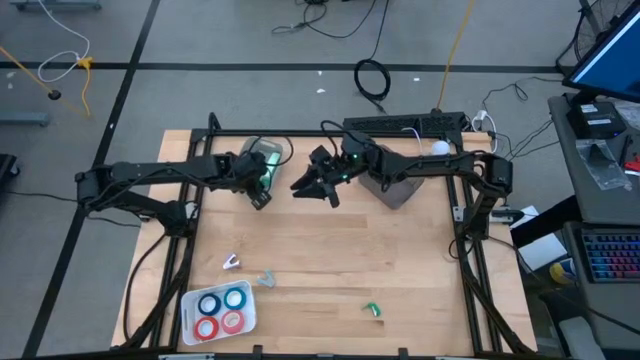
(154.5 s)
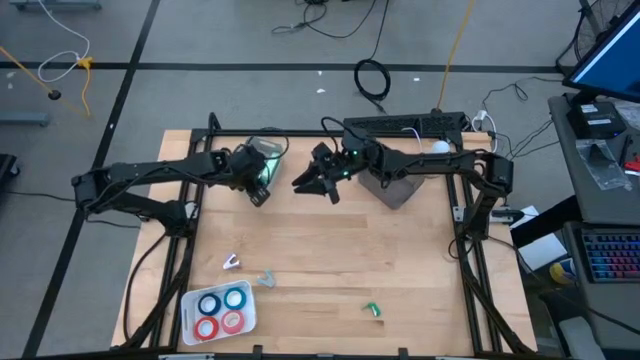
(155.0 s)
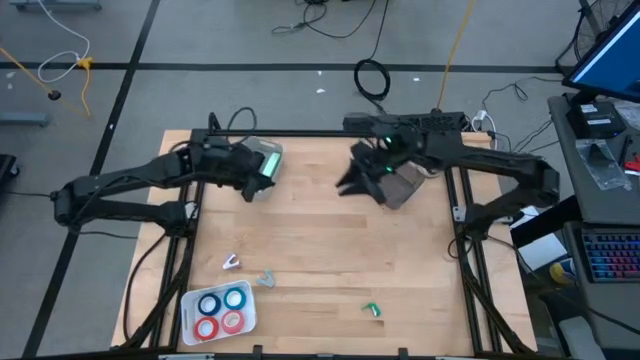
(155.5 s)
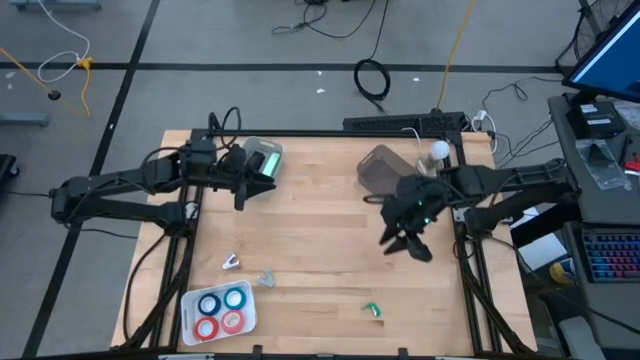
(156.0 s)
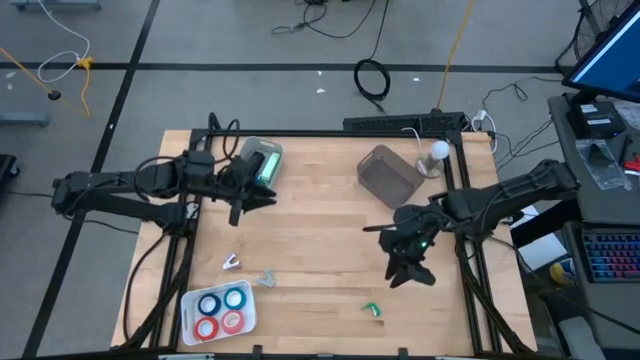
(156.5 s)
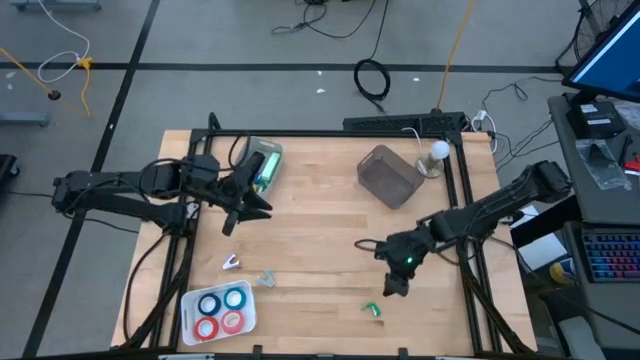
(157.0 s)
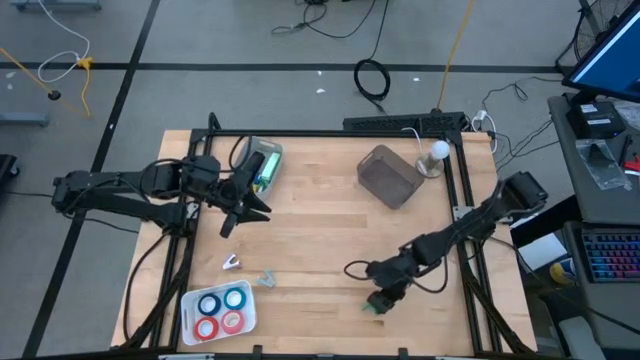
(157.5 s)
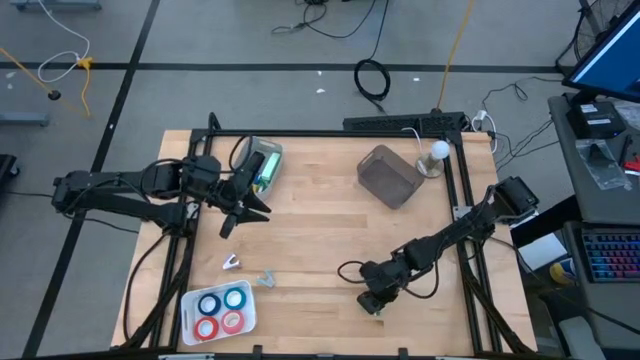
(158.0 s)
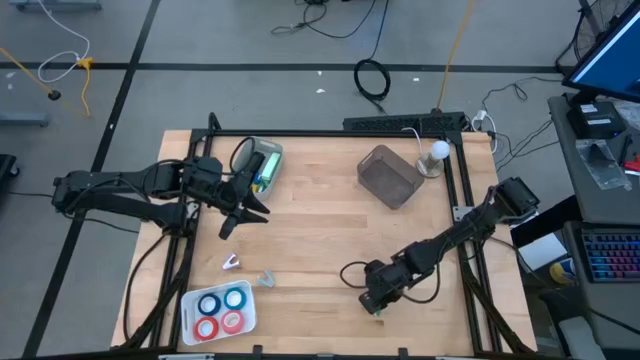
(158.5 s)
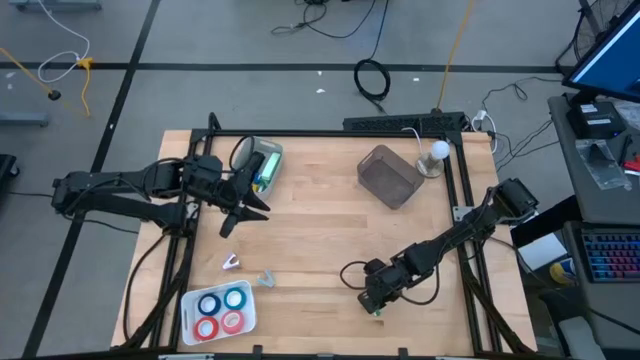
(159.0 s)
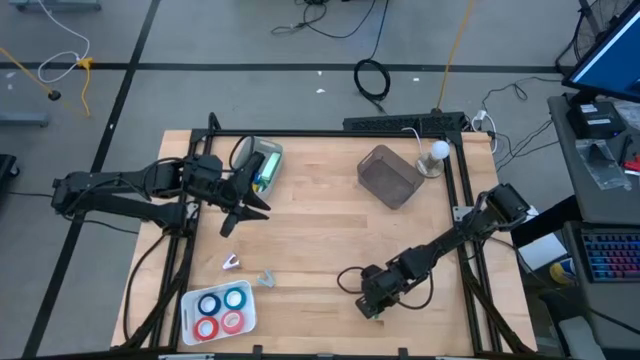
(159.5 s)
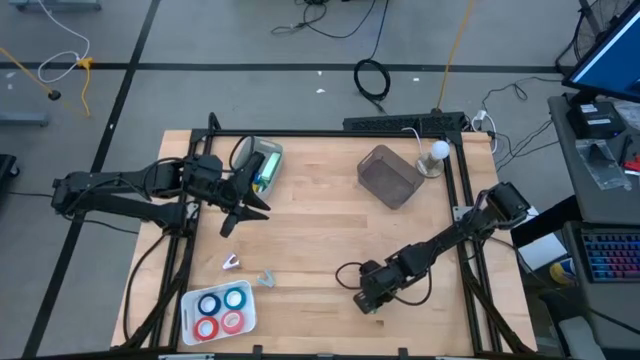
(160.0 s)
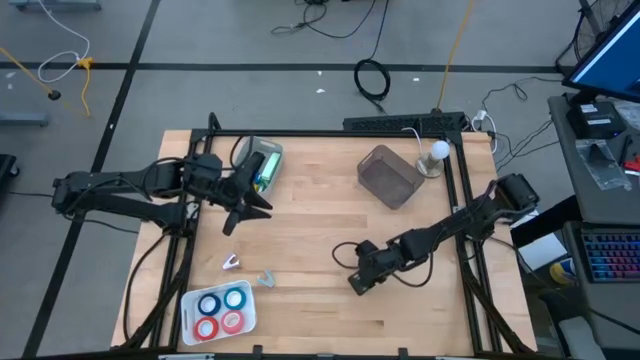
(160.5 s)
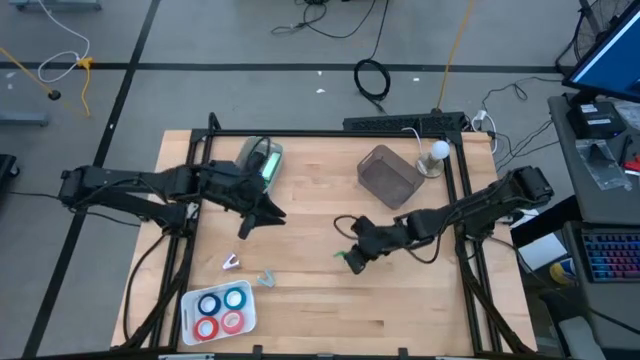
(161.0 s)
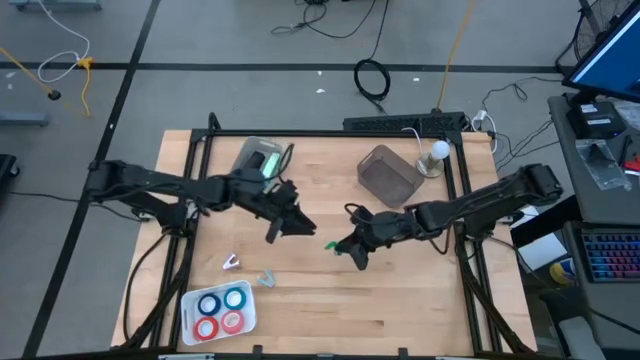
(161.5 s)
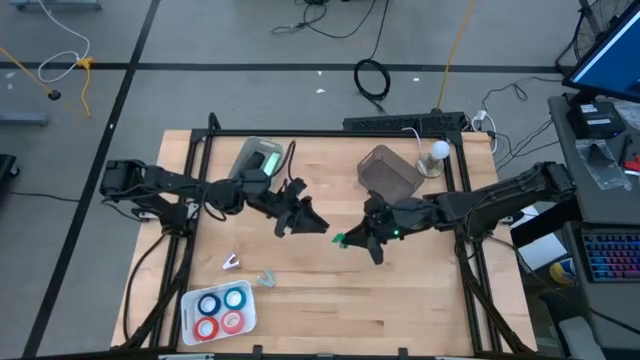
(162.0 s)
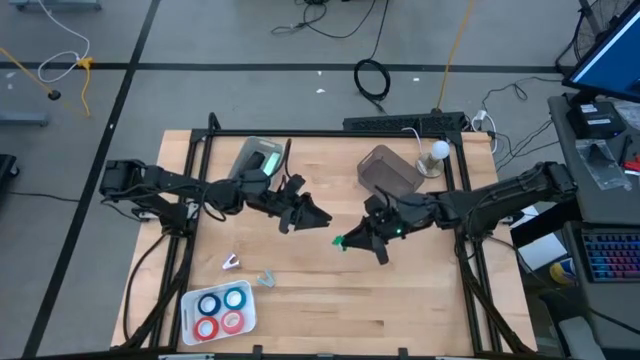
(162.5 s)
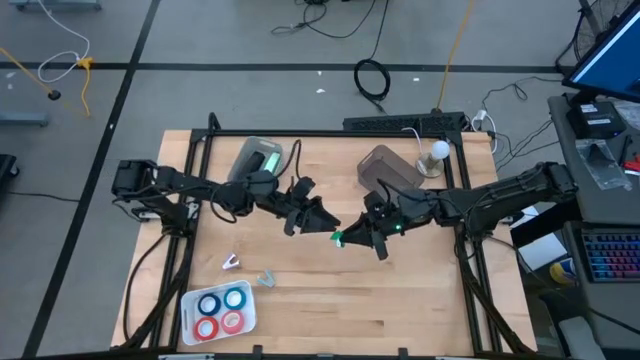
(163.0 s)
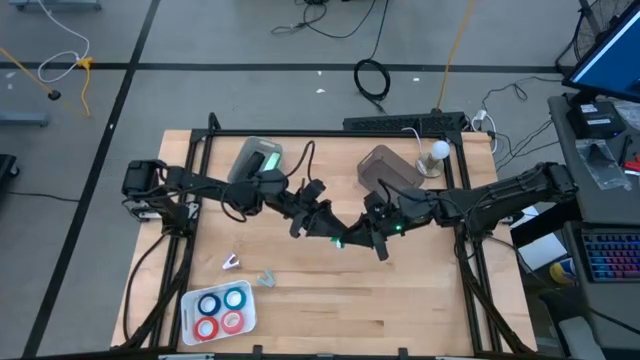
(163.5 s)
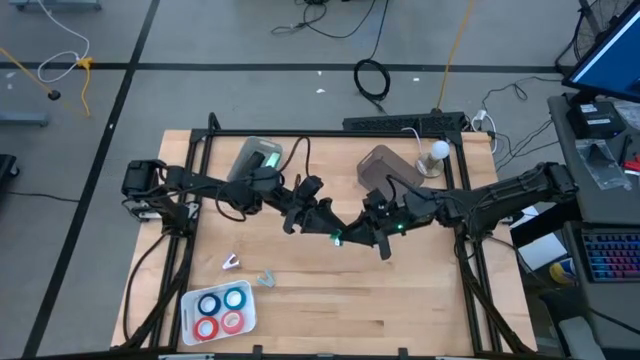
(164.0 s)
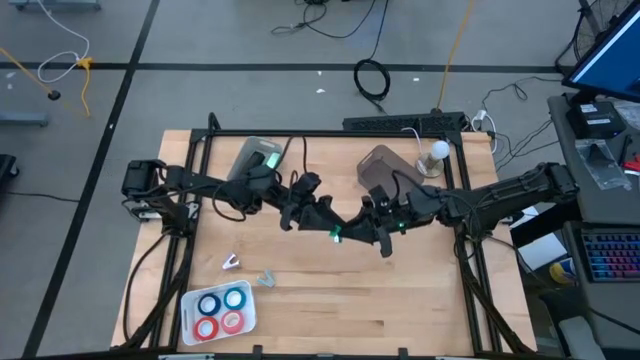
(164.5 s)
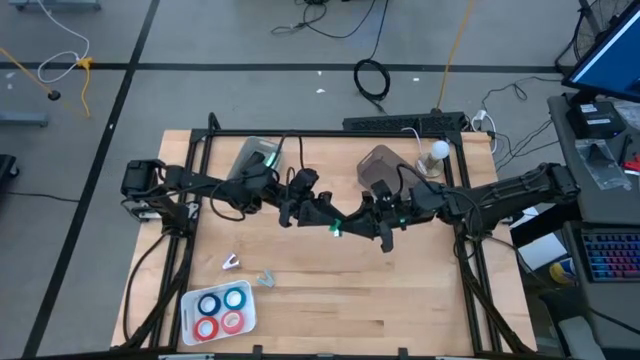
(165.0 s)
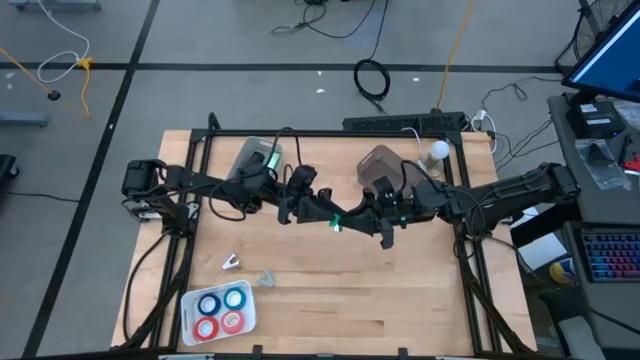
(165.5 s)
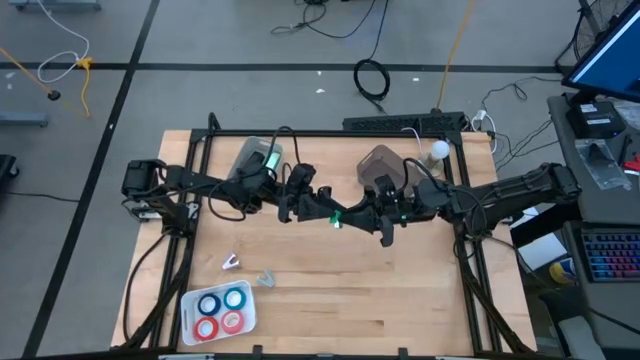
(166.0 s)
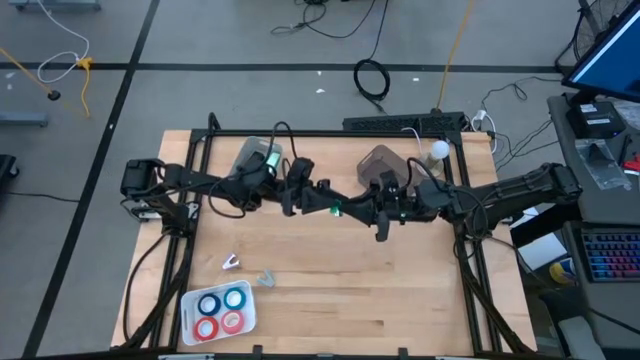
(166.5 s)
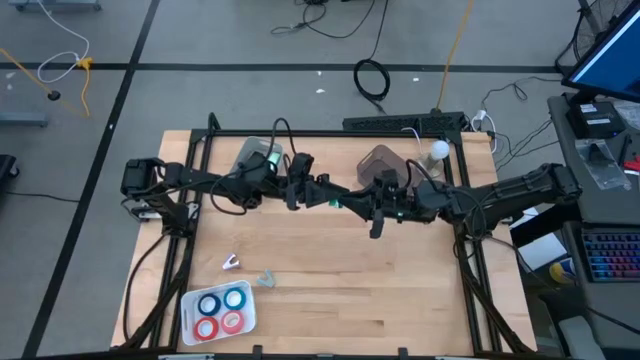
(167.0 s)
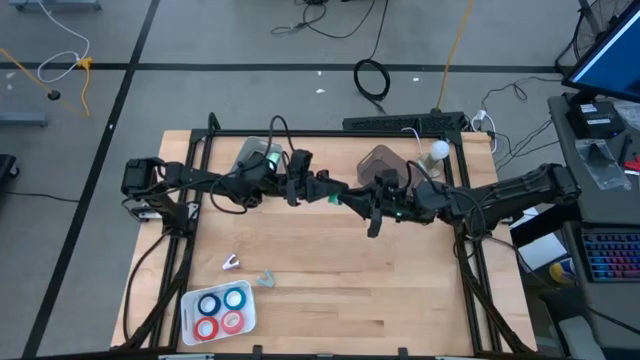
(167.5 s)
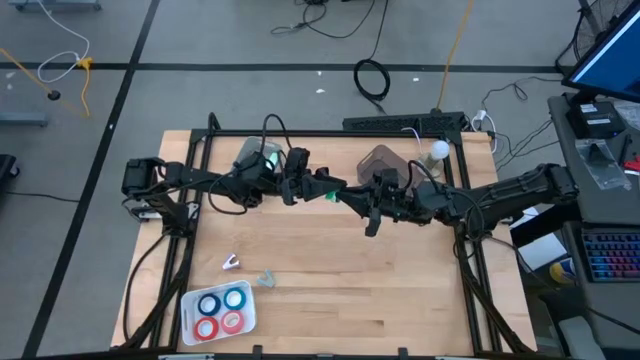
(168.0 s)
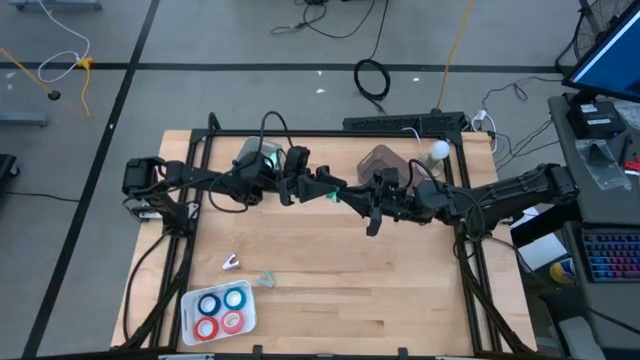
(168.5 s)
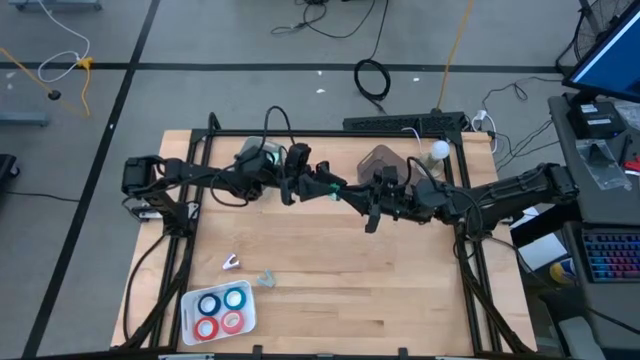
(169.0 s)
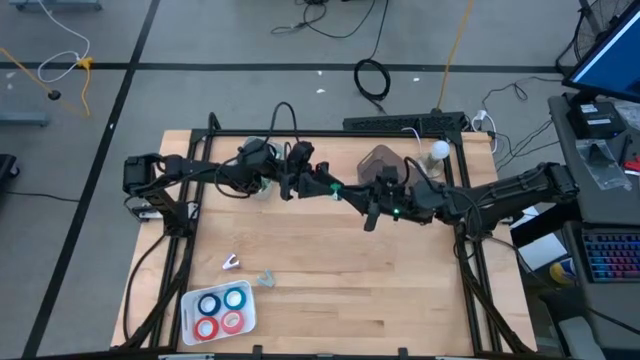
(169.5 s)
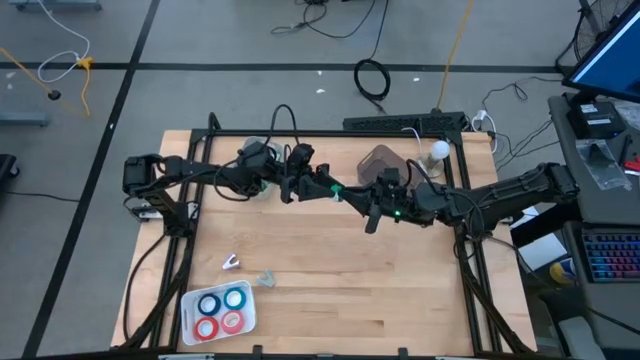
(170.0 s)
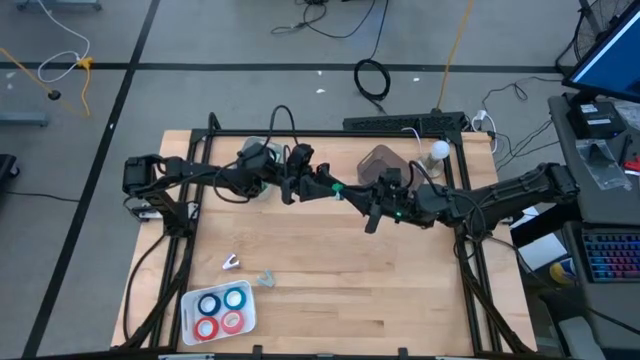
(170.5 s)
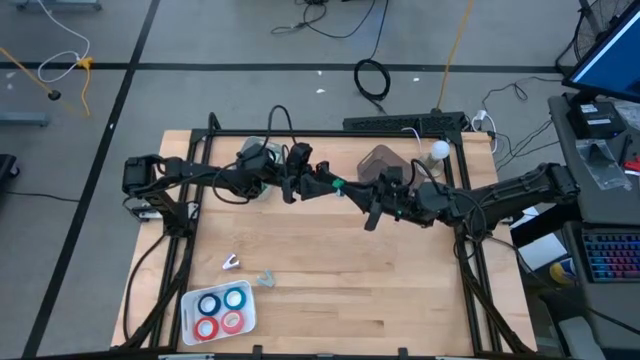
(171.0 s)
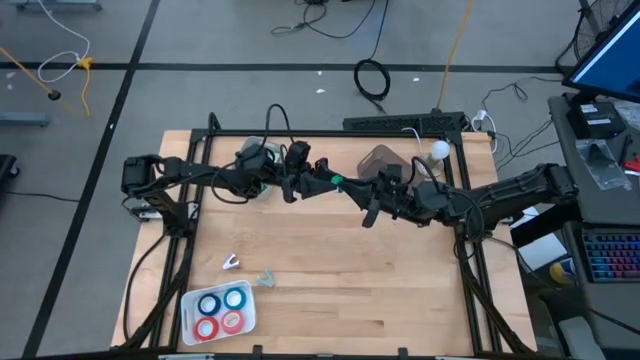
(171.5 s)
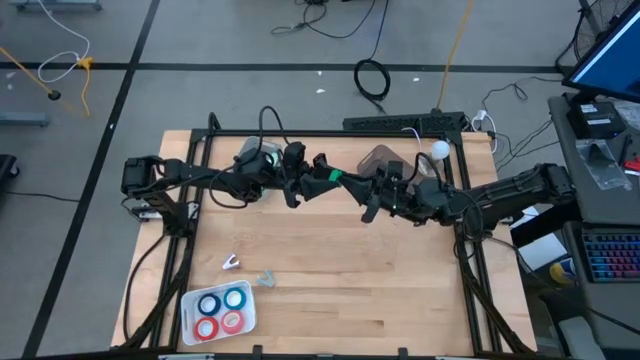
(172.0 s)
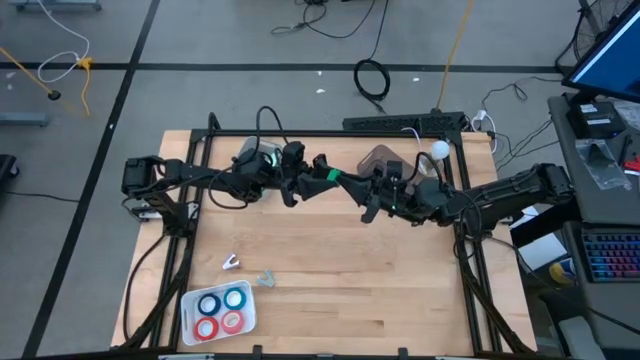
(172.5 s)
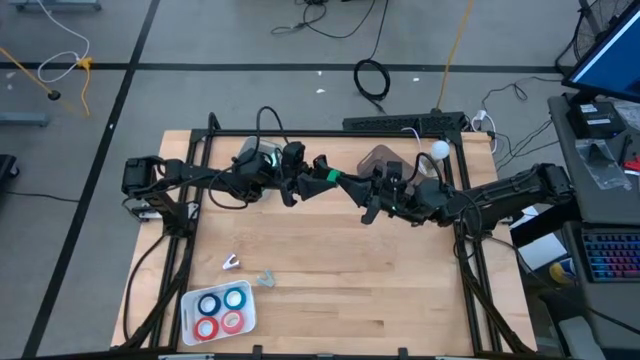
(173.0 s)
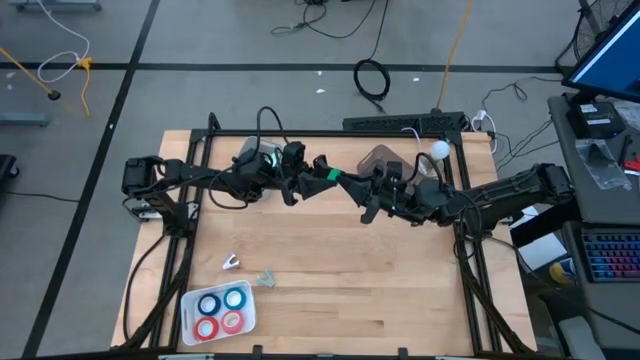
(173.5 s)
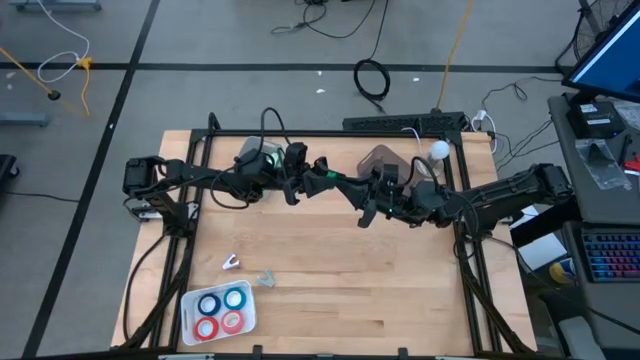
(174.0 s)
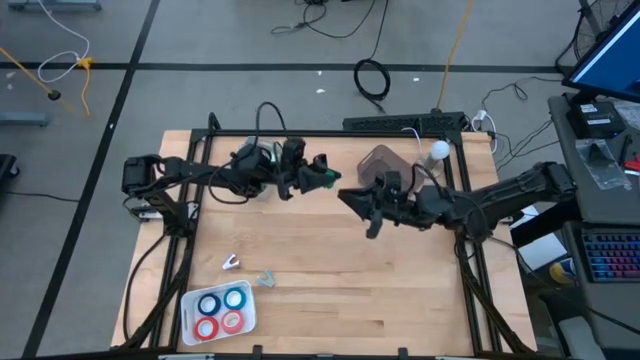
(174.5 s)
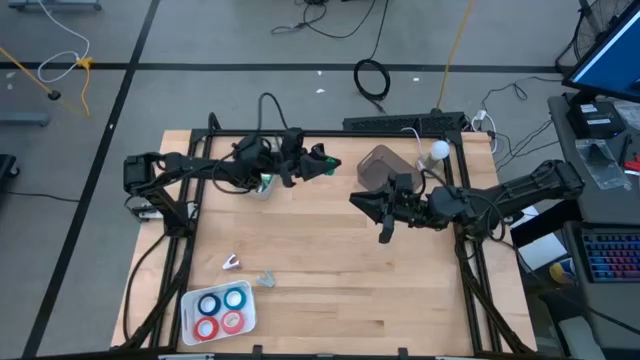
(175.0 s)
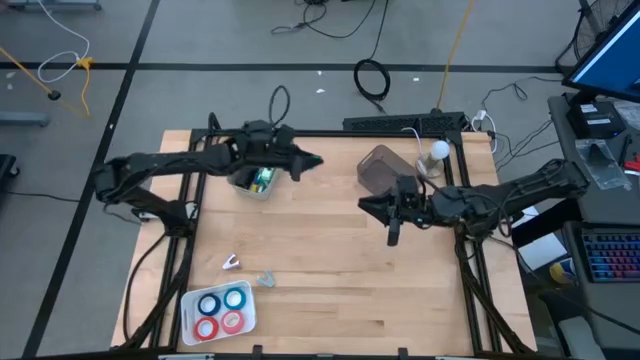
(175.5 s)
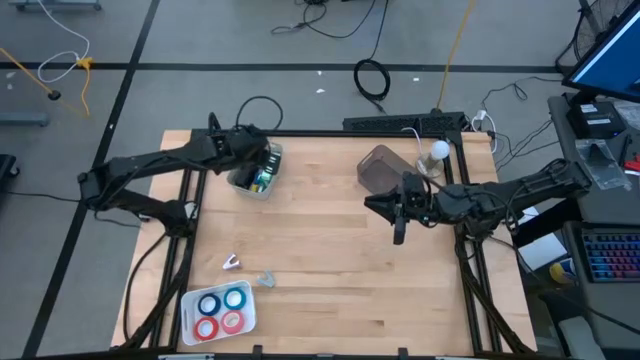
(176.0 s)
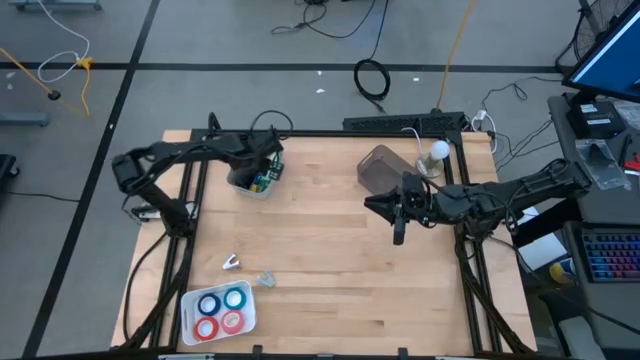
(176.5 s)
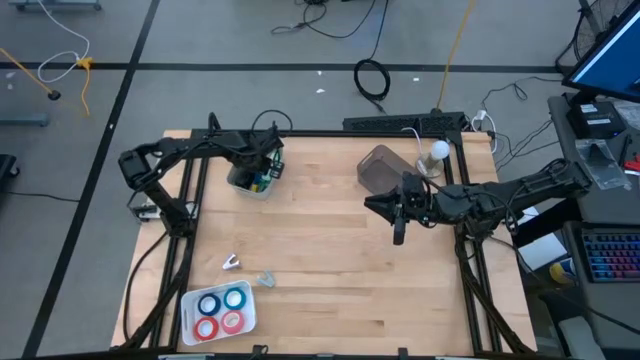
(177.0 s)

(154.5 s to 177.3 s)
Task: Pick and place Stapler, Stapler remover, tape
Put the green stapler into the gray bin
